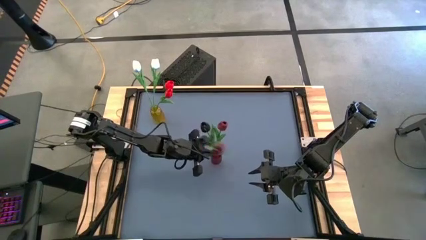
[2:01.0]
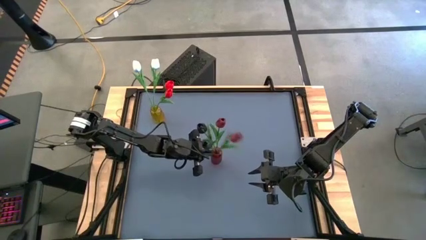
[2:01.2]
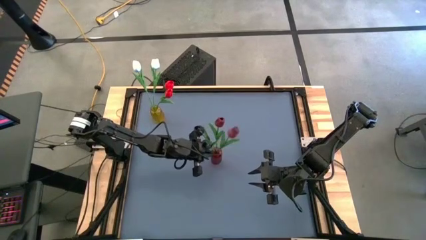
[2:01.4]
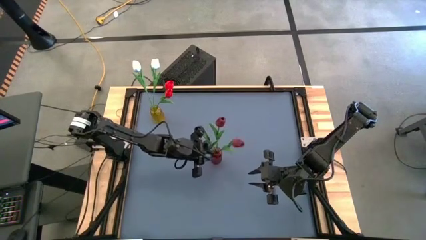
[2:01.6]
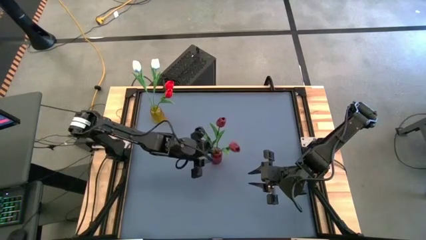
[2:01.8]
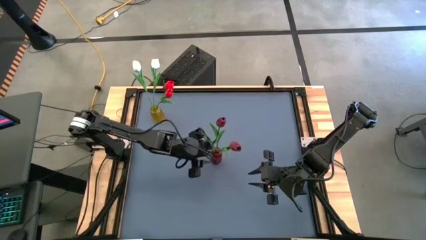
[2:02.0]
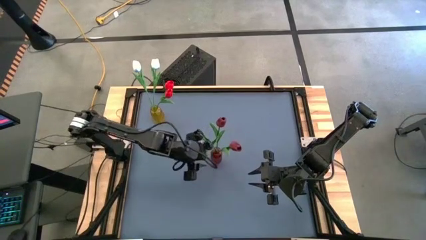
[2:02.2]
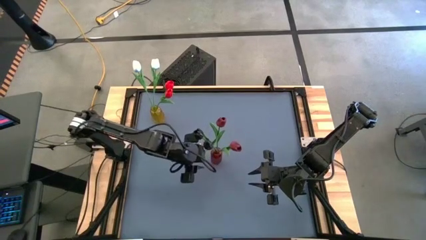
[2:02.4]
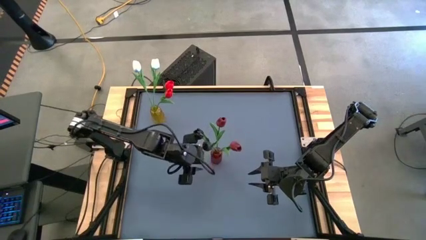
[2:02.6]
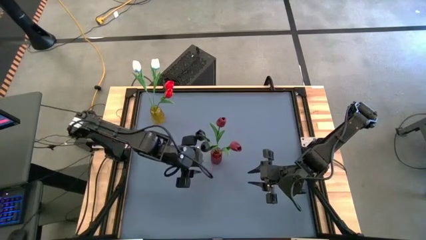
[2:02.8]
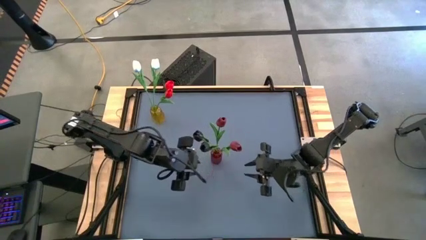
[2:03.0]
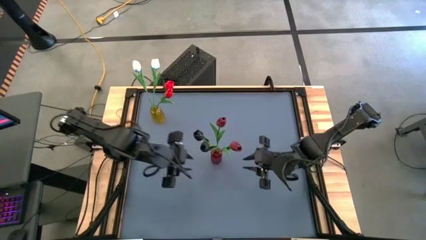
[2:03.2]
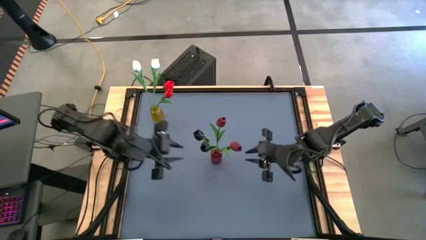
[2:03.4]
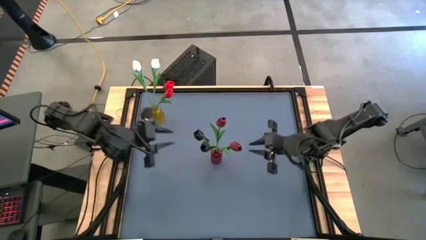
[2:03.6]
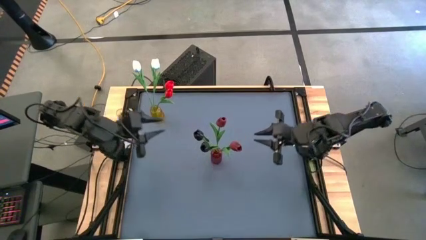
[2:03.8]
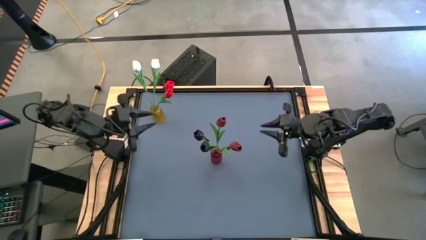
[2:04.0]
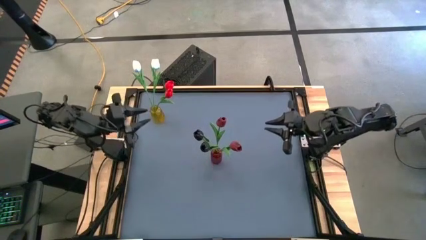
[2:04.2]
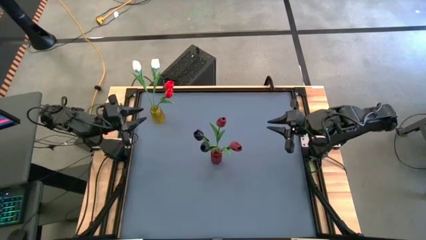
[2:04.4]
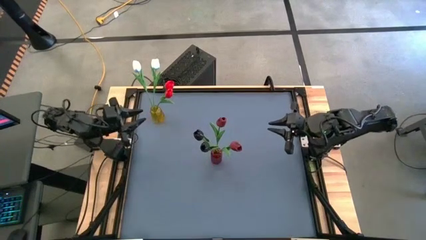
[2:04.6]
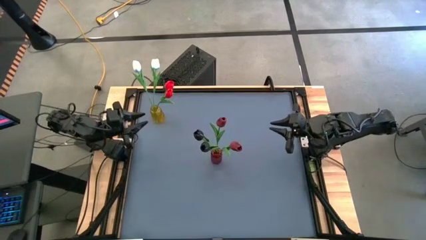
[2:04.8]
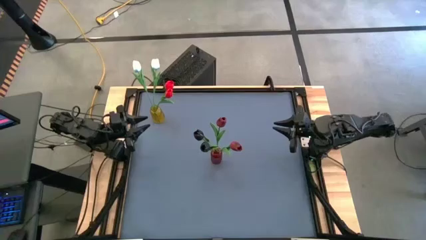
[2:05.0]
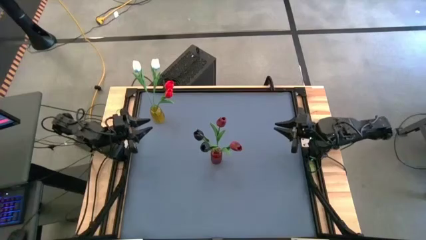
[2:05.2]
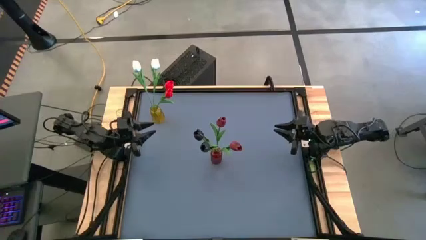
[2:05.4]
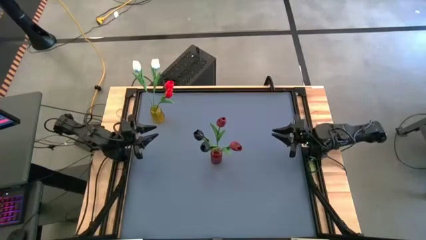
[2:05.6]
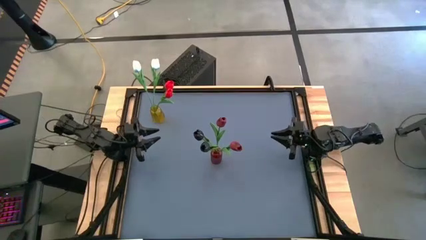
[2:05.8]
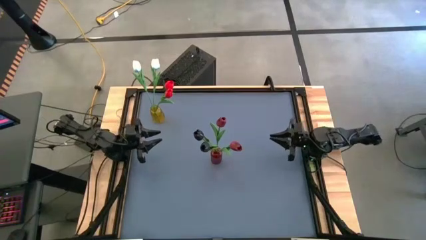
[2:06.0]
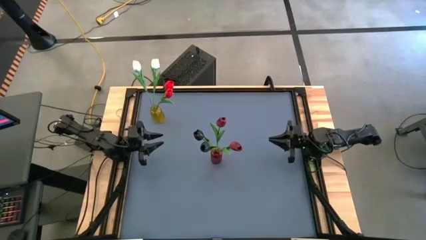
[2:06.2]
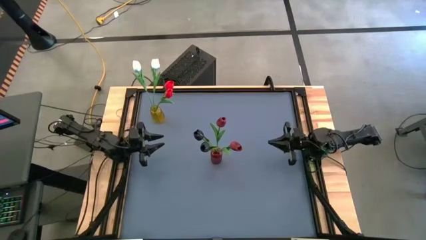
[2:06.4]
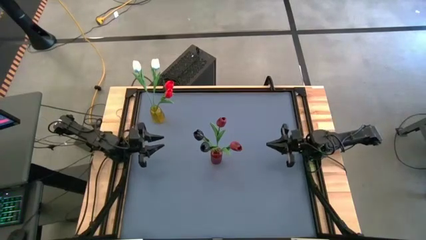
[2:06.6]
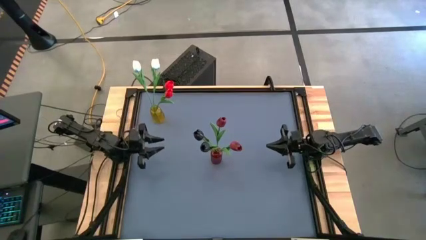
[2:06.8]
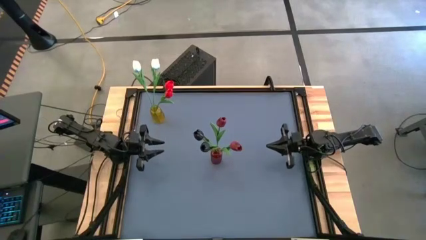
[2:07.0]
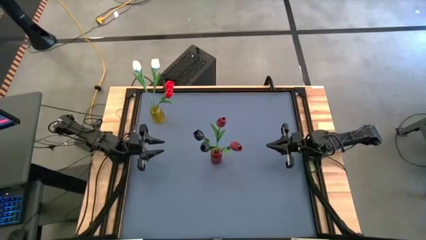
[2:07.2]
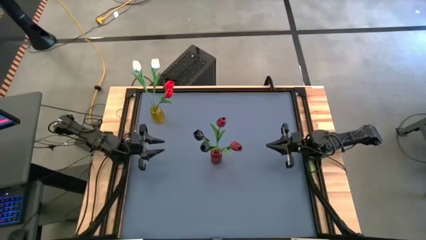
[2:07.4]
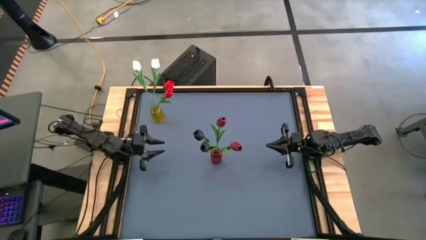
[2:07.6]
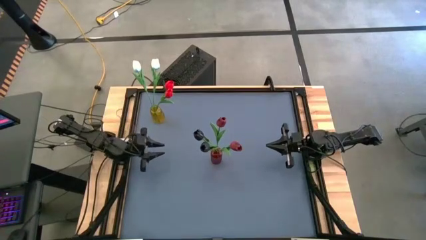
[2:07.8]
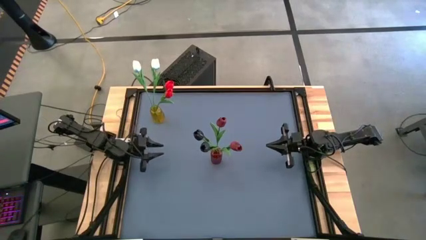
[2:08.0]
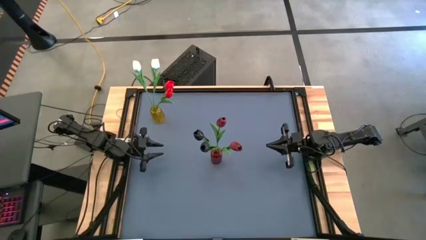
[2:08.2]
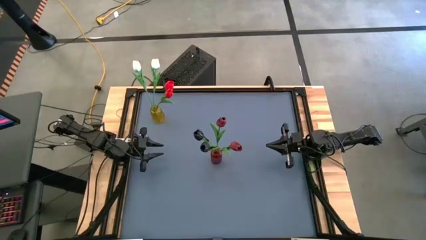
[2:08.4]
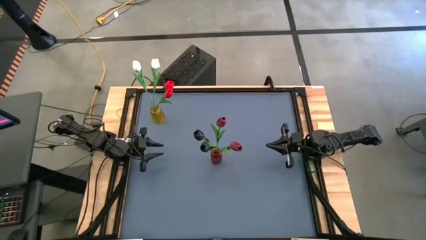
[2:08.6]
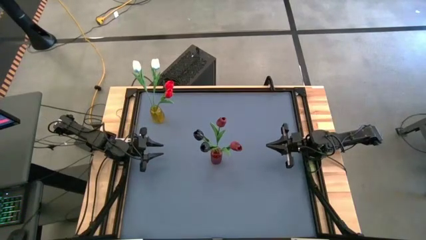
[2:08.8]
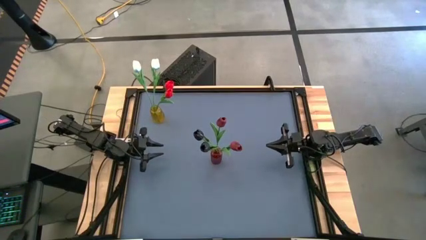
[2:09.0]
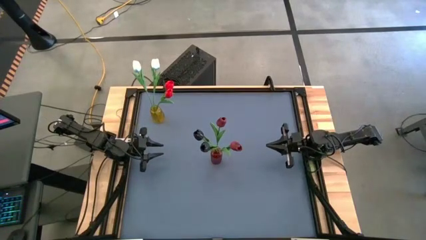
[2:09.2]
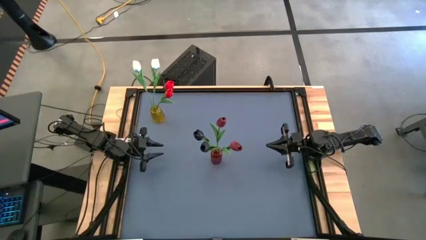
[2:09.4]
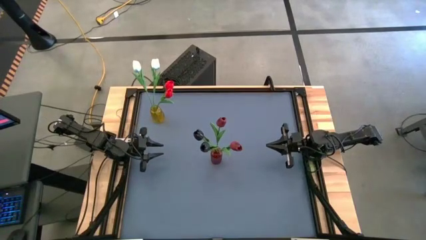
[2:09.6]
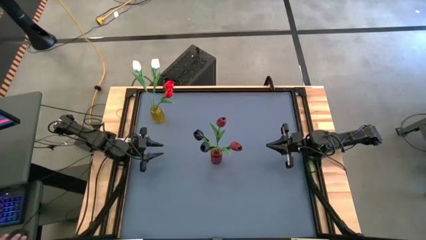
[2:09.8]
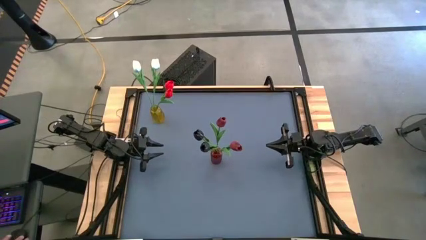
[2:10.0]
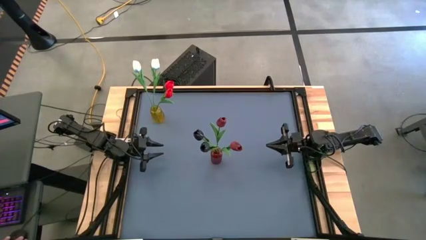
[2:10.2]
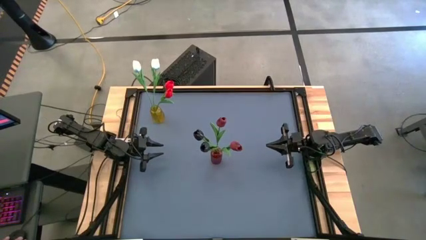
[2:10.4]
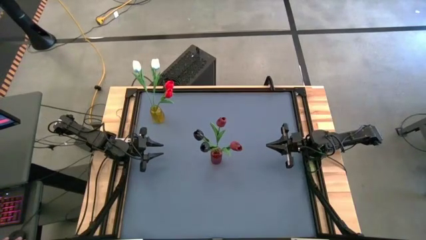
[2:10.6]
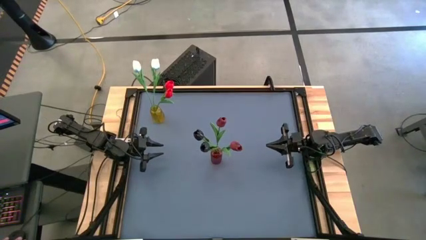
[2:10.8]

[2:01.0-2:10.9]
Task: Sort flowers into vase by color
Return to Home Position
